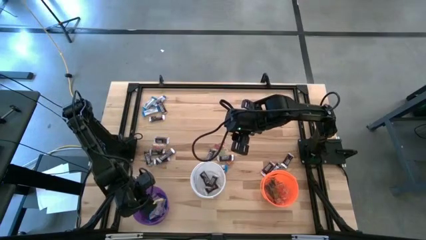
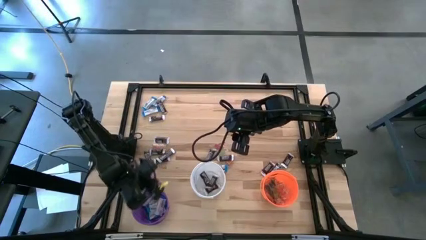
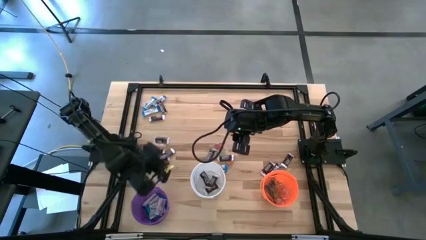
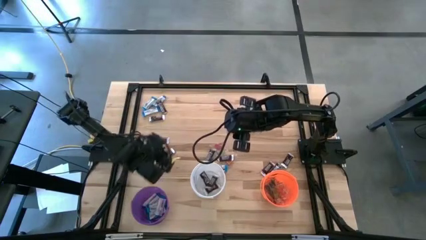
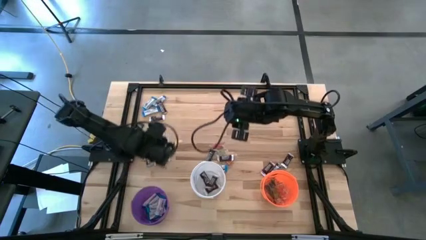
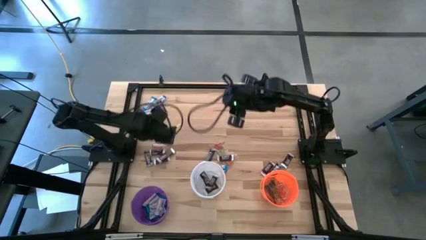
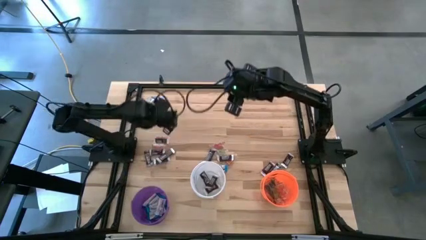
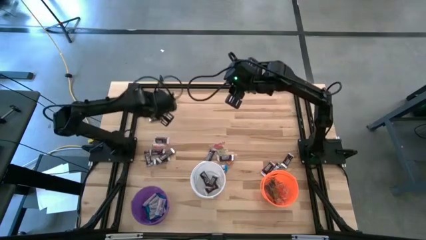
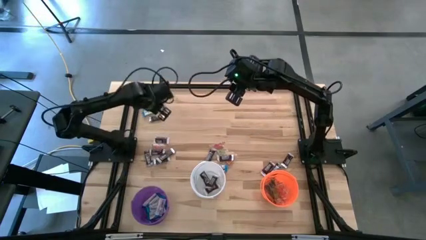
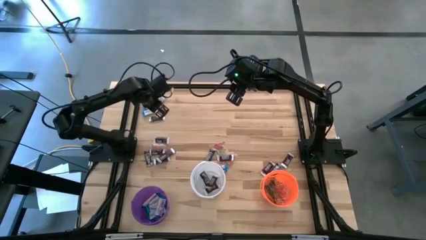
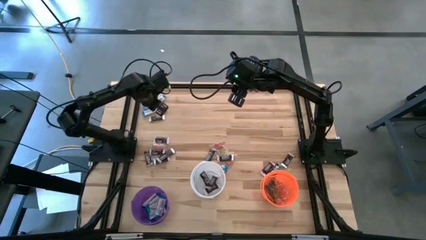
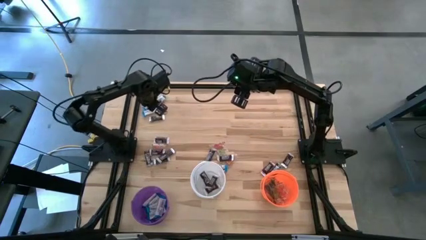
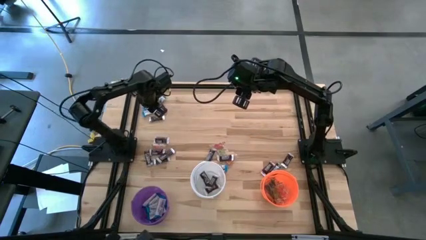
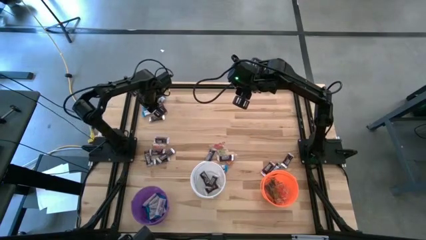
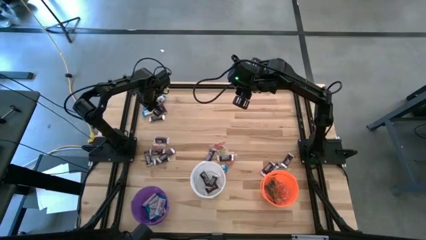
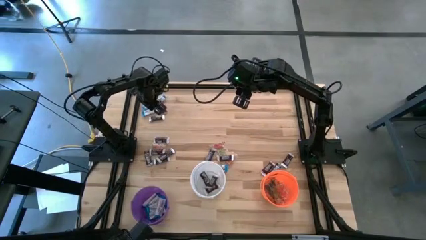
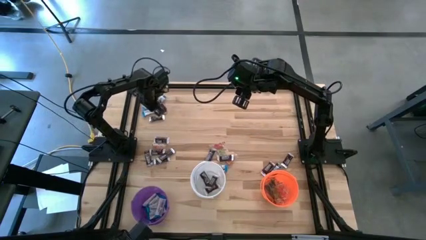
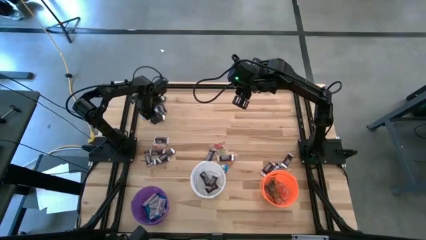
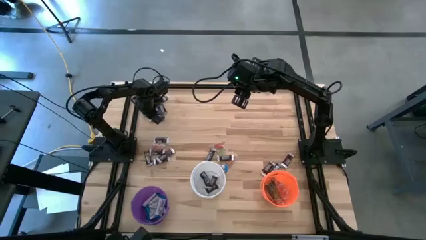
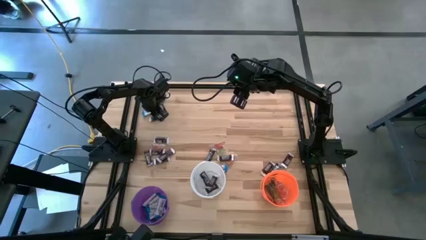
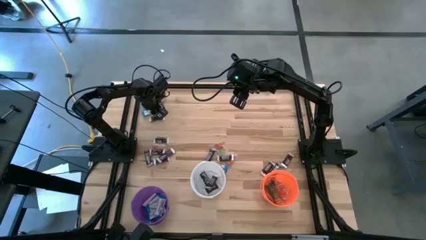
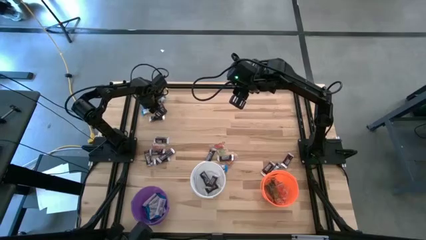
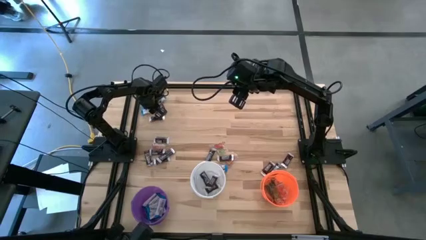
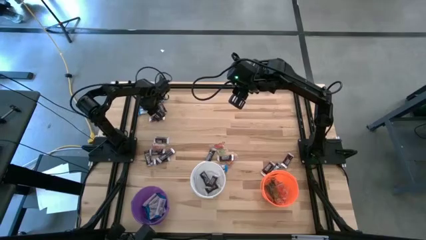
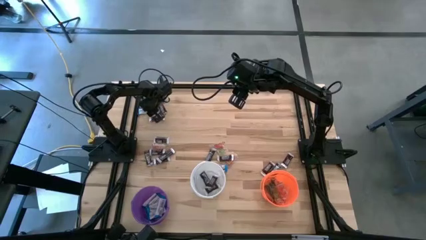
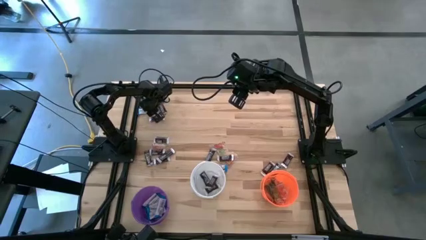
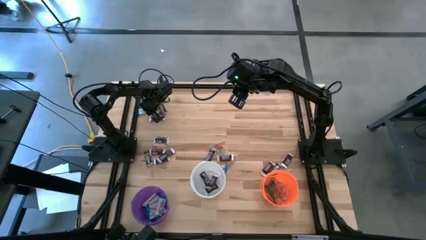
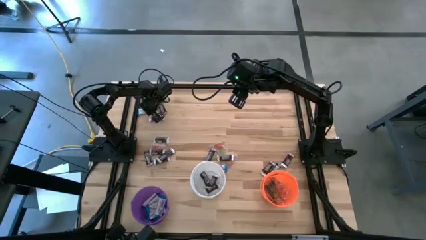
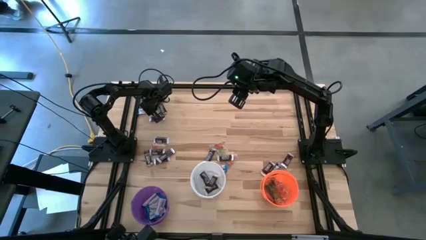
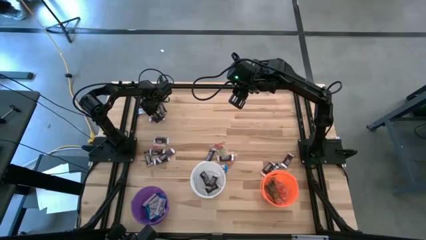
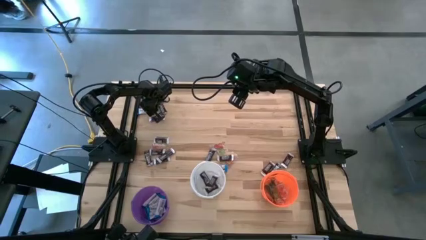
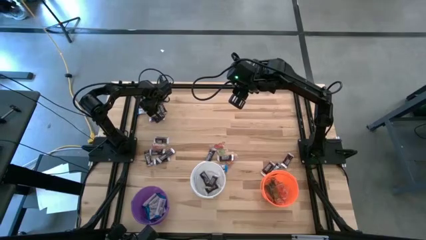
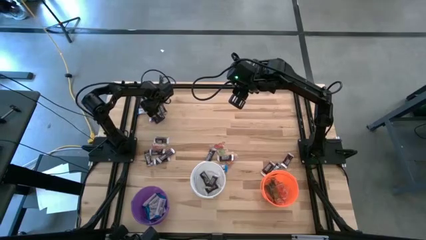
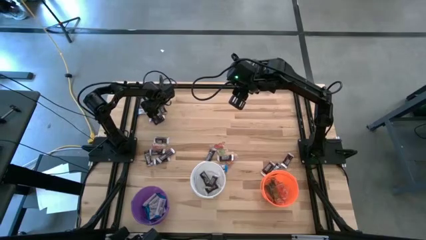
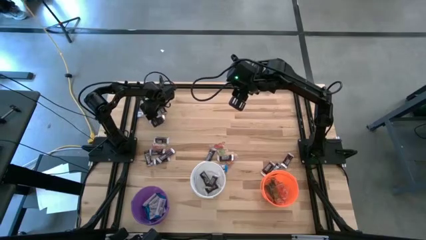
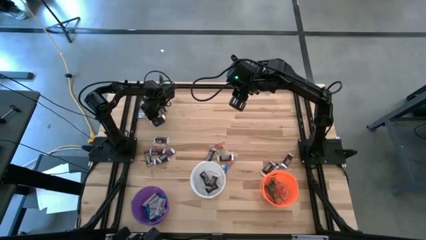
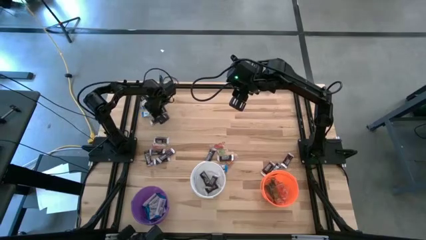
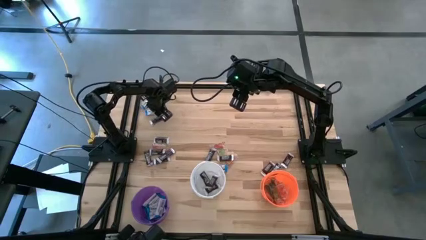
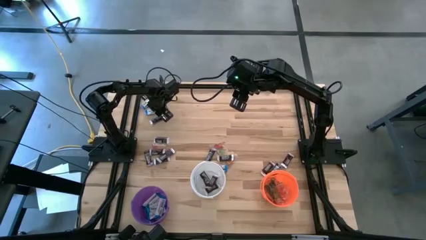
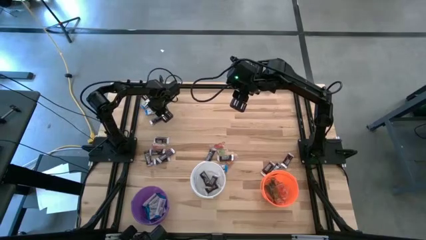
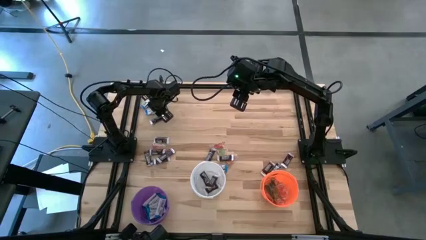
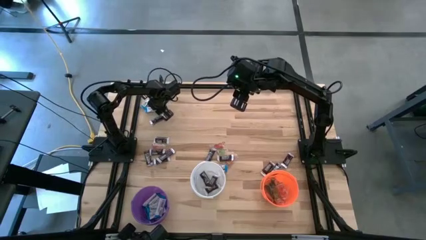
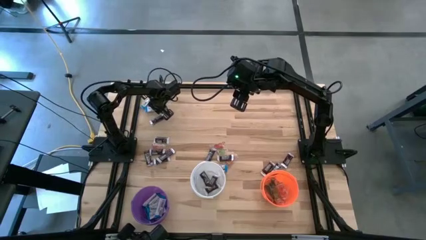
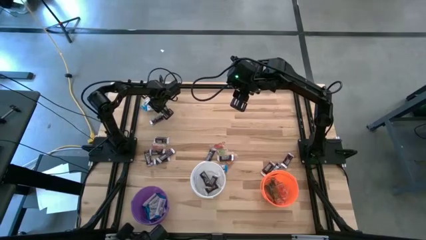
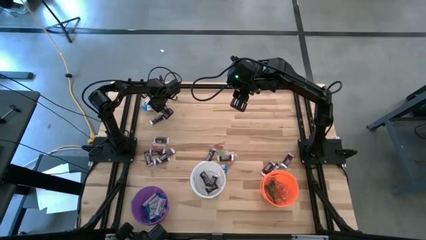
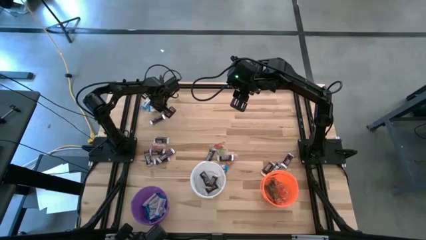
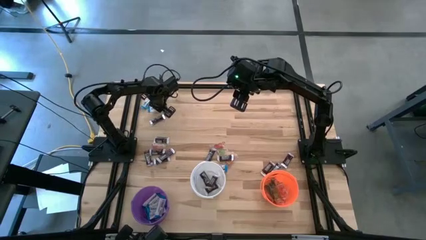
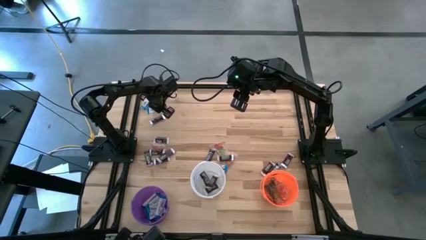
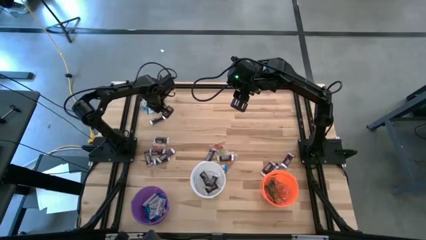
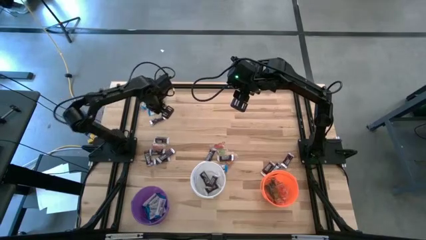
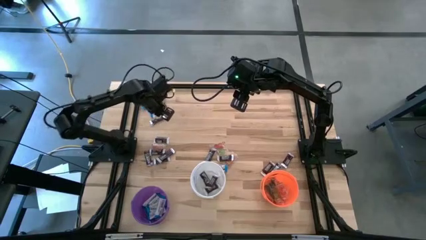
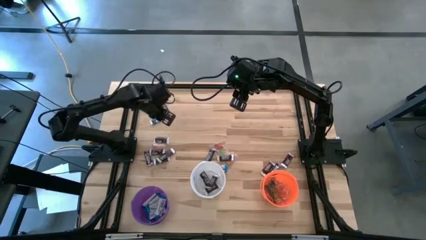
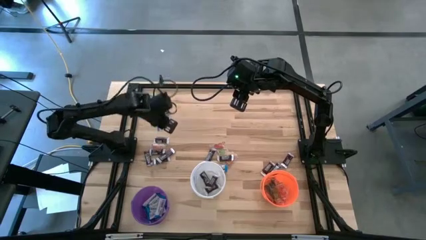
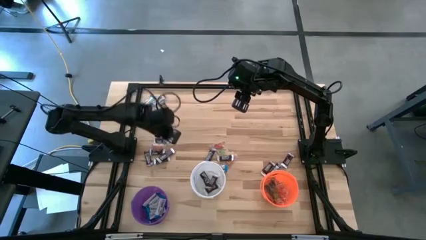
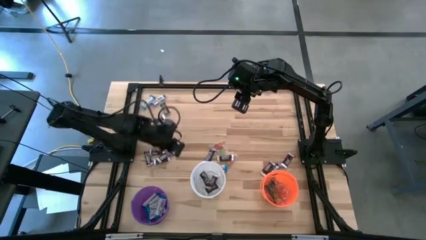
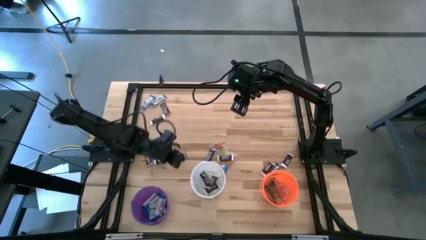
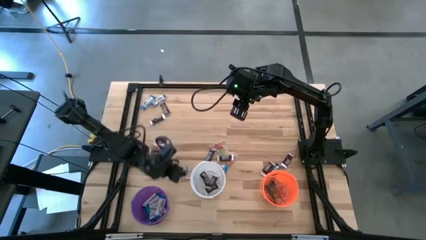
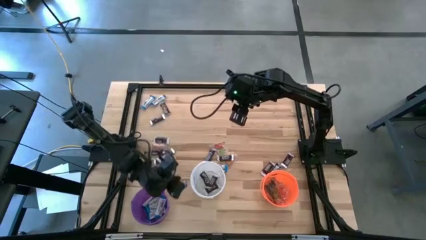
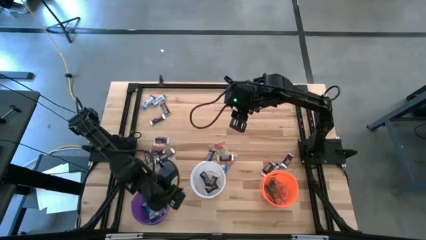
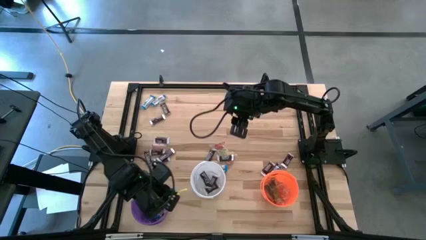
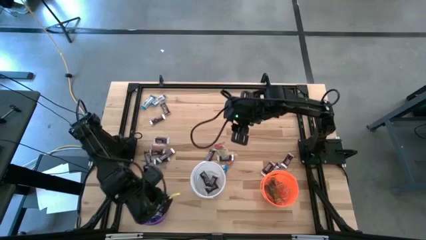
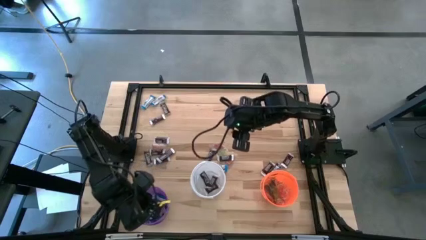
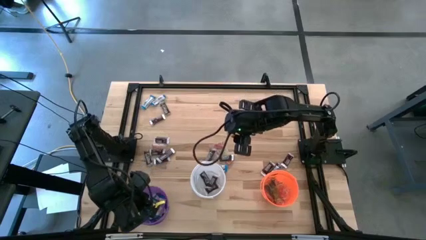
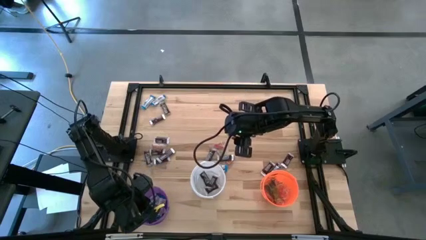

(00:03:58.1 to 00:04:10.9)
Task: Sort candy
Put the white chocolate into the violet bucket

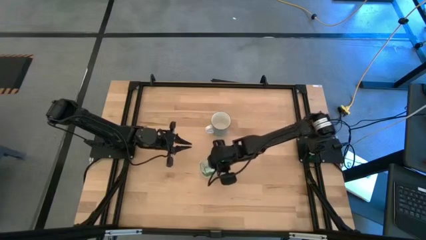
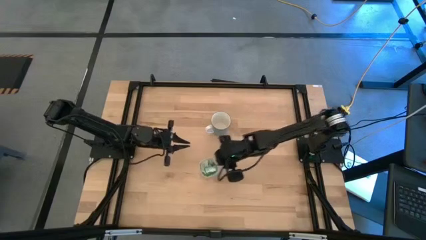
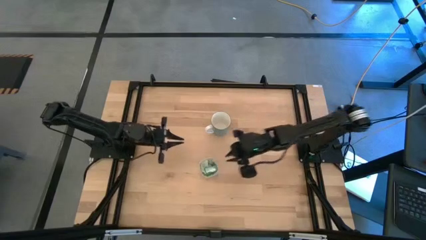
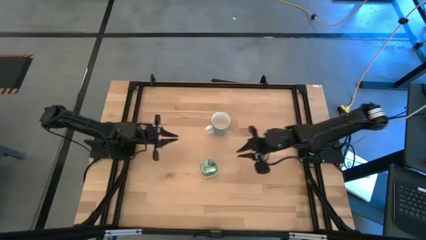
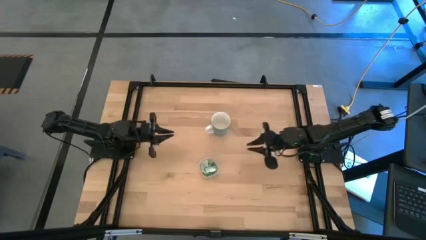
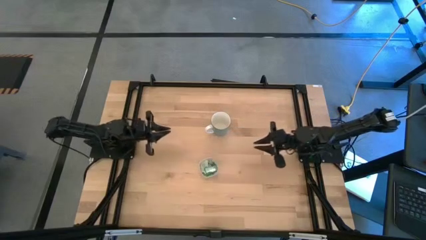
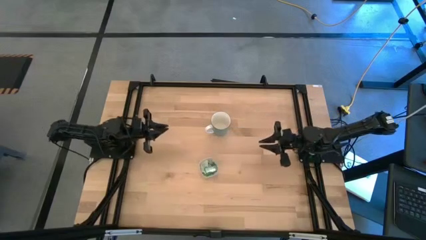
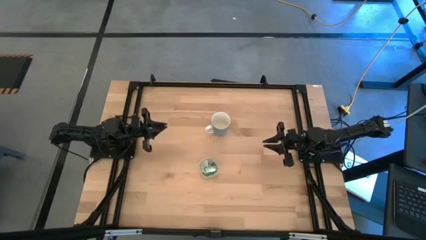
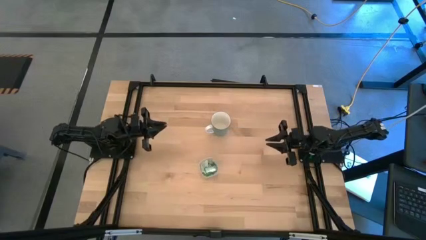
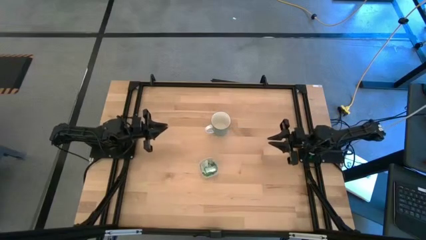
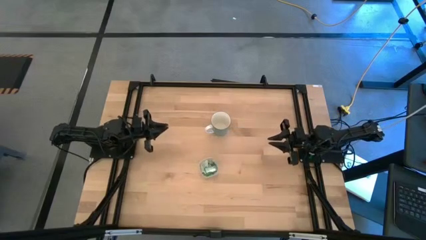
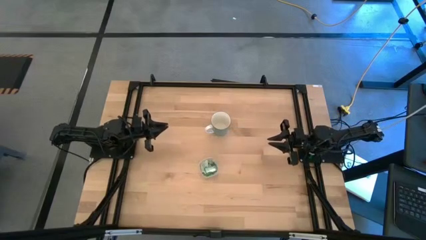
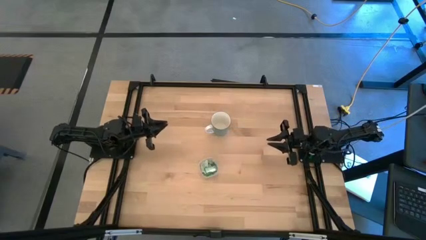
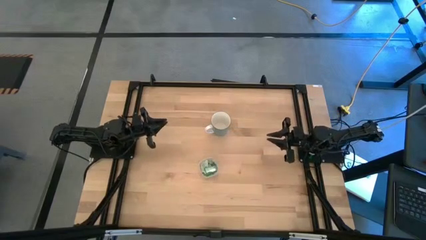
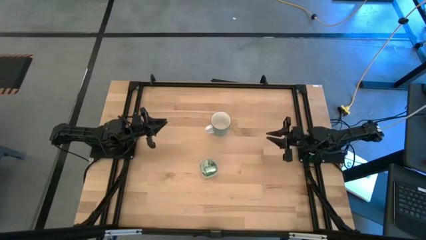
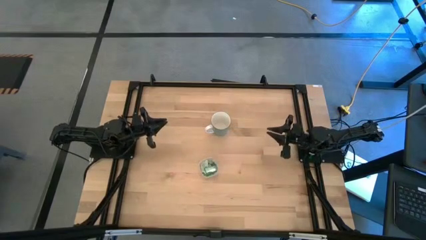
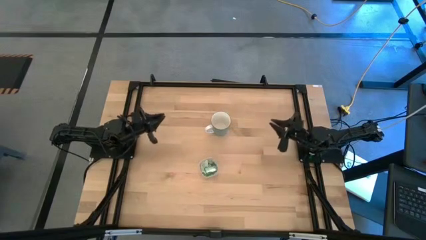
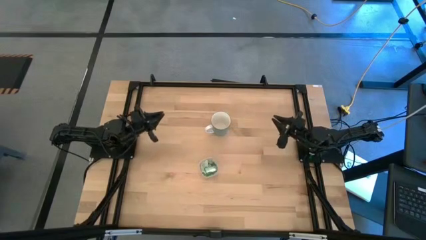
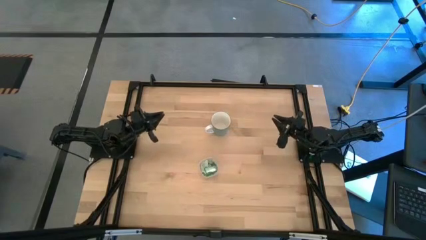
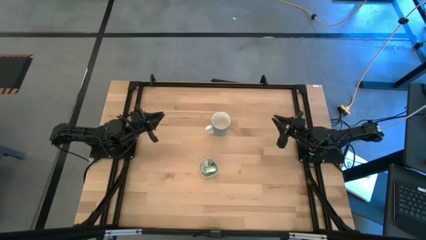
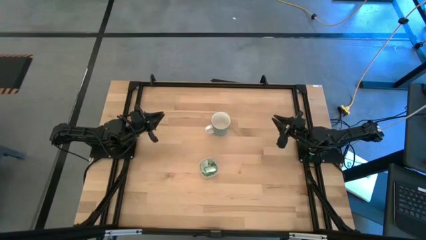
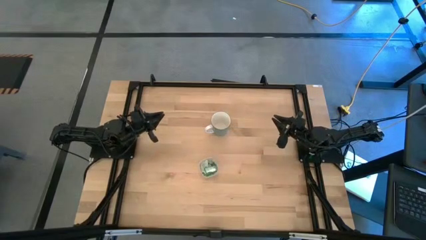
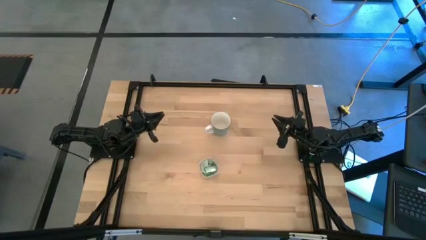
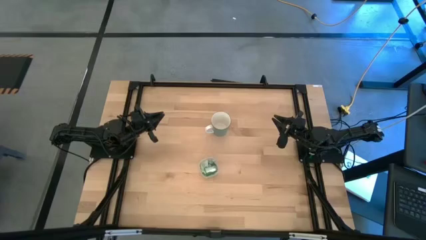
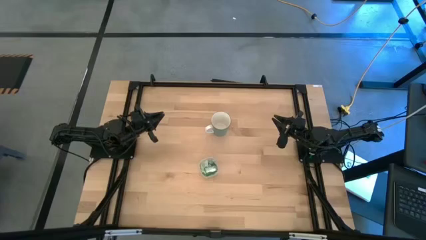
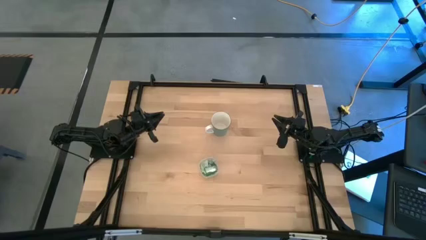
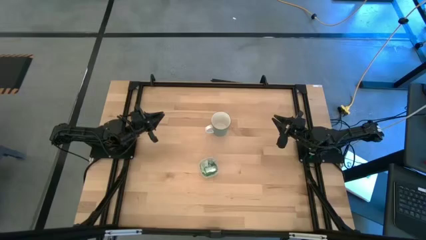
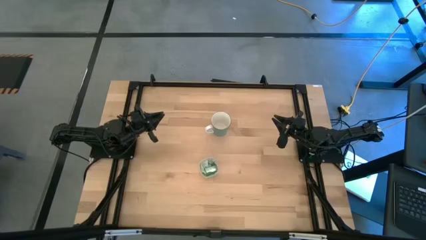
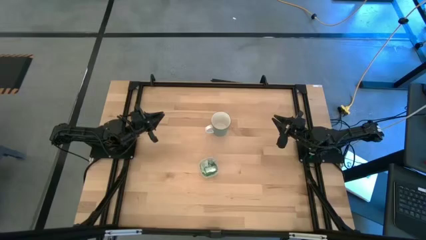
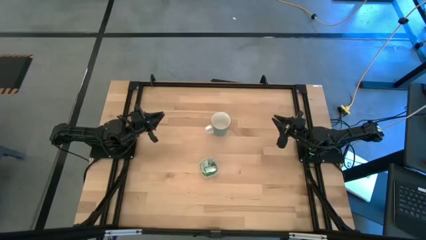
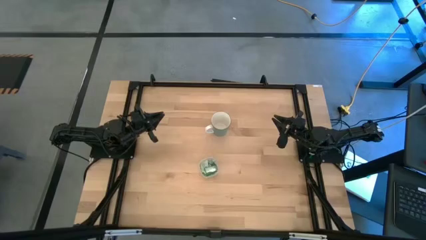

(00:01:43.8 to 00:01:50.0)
Task: Pick and place Stevia / Truvia into bins
Return to Home Position
